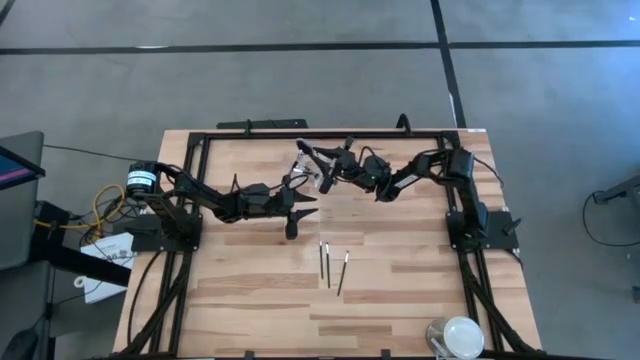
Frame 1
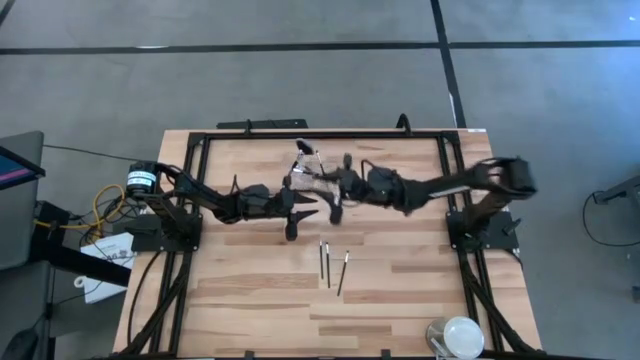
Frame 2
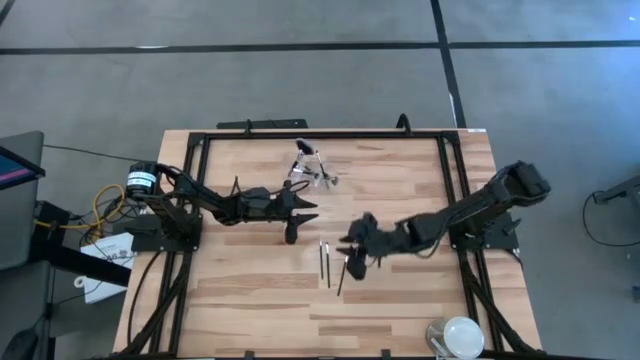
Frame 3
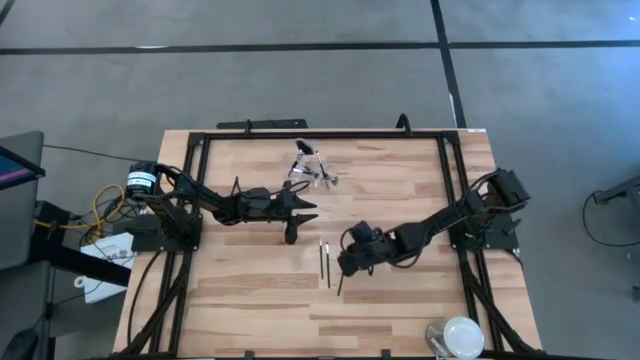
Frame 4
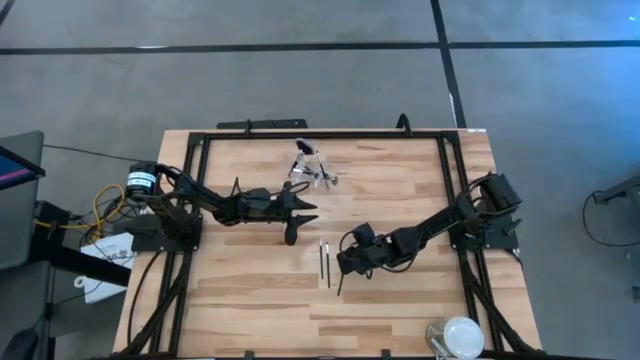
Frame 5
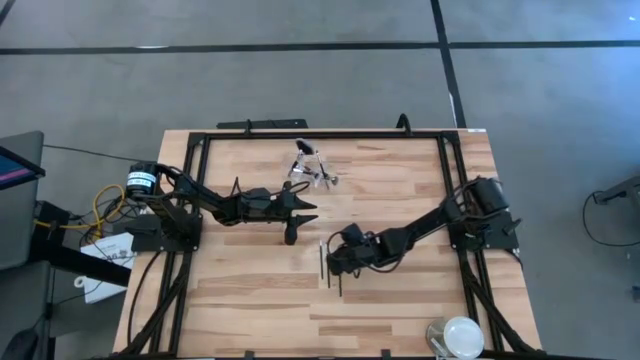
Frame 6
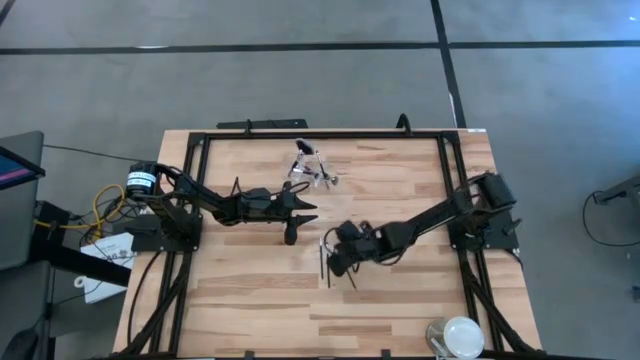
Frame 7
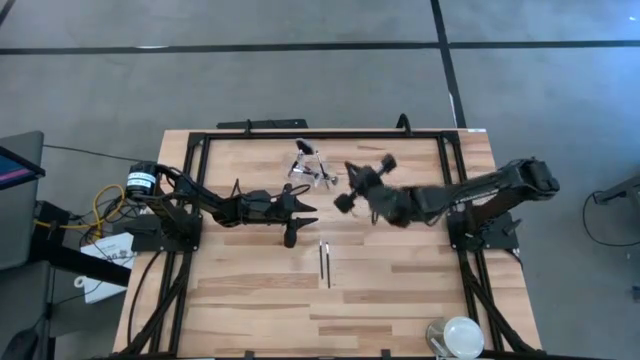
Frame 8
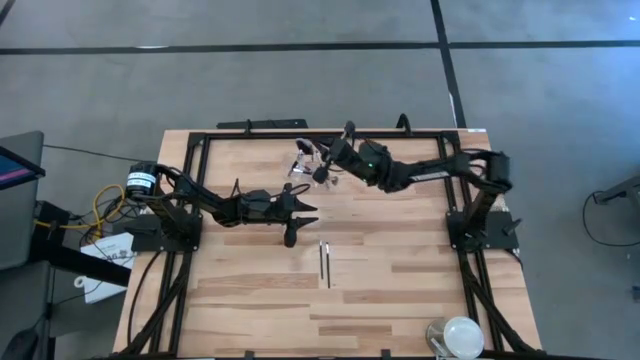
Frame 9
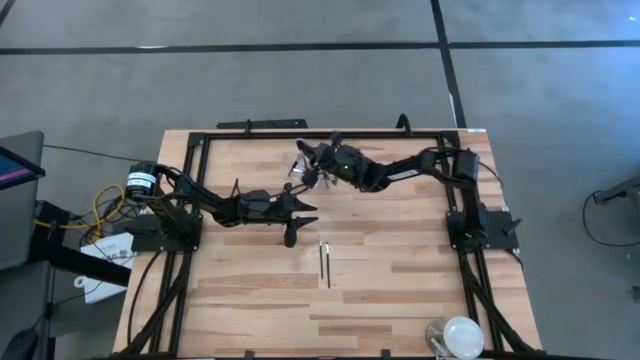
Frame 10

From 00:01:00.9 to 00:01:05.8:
Task: Sort items
Put the right eyeshadow brush into the transparent organizer

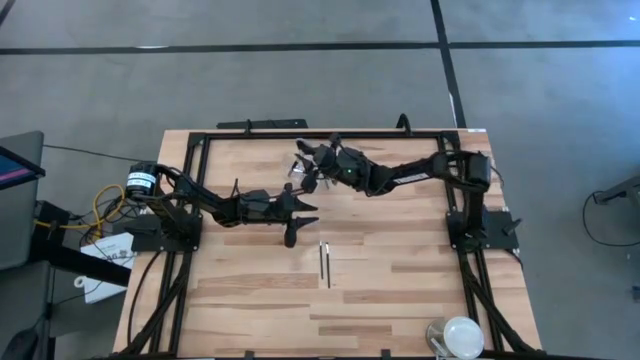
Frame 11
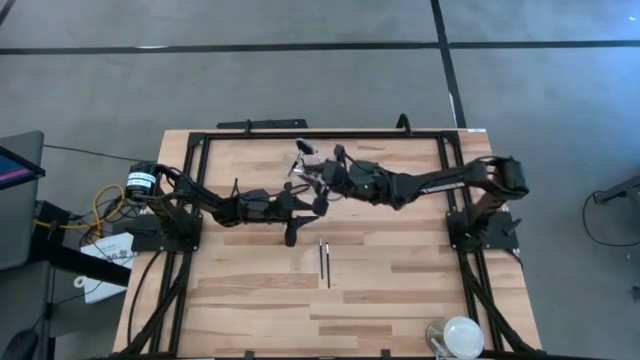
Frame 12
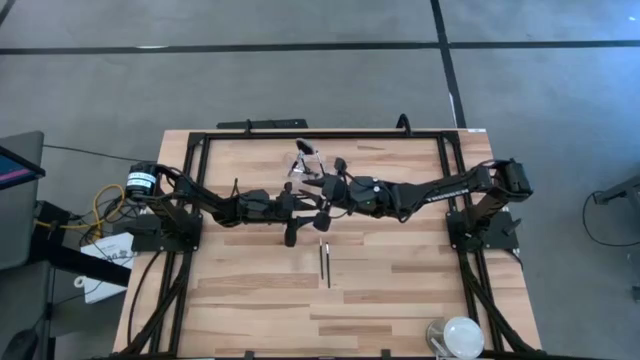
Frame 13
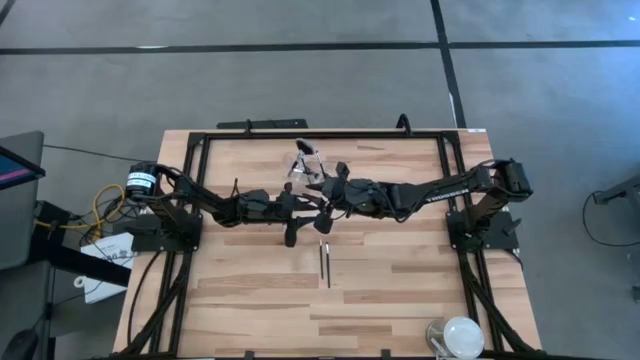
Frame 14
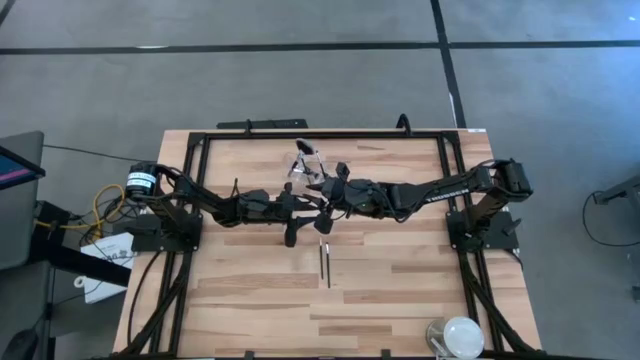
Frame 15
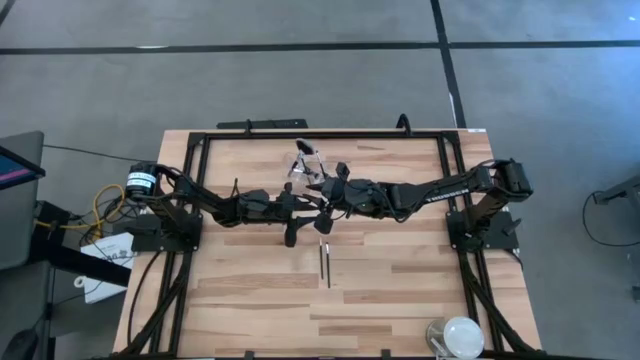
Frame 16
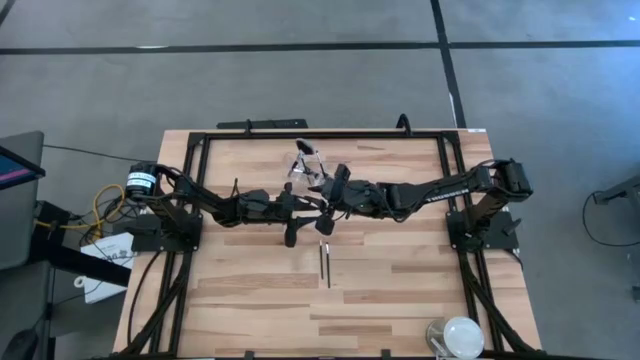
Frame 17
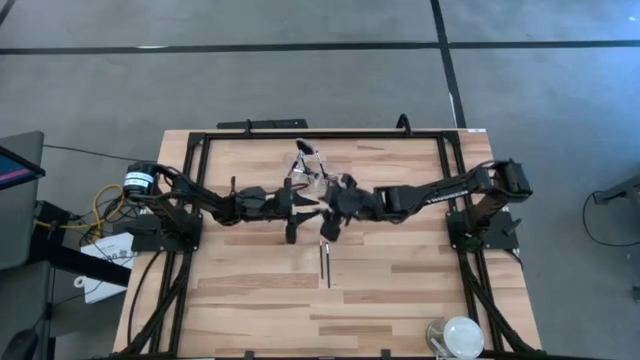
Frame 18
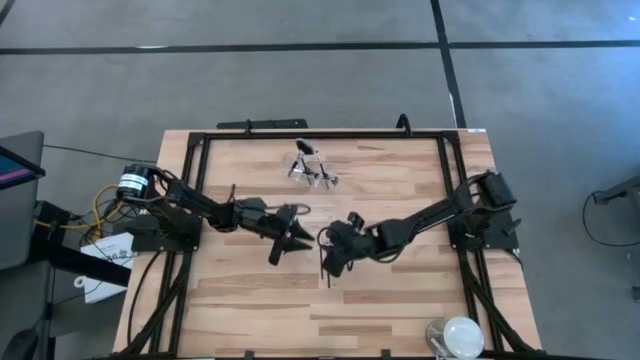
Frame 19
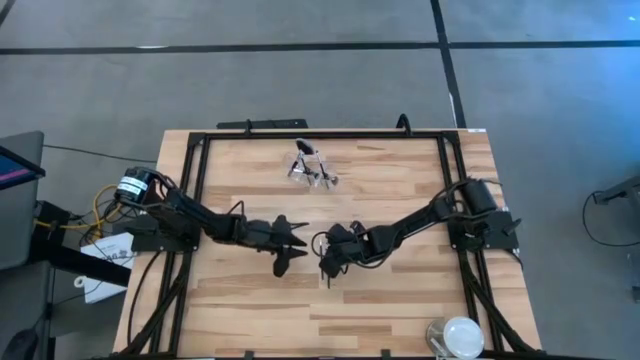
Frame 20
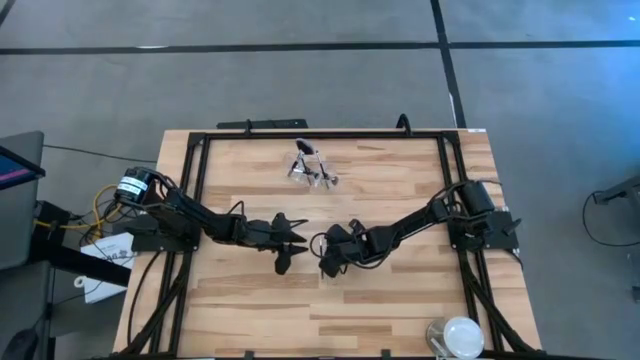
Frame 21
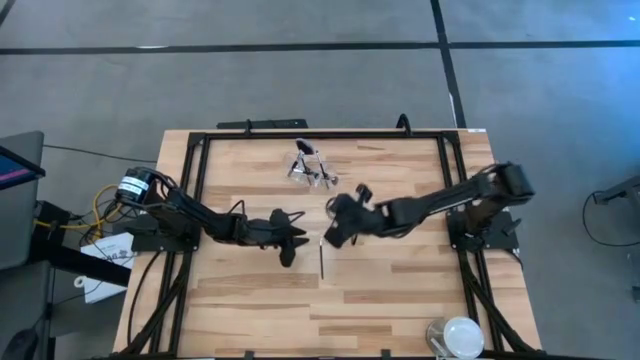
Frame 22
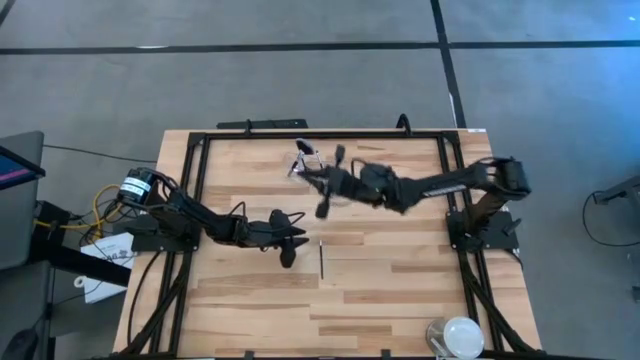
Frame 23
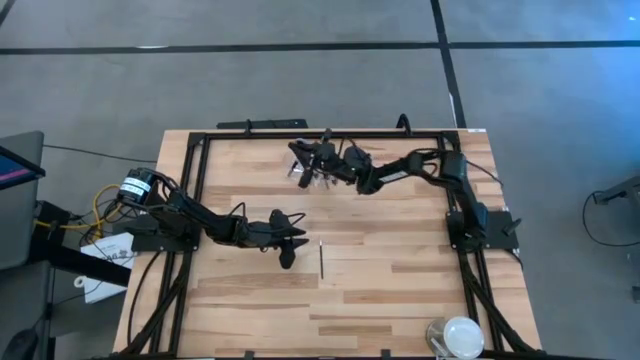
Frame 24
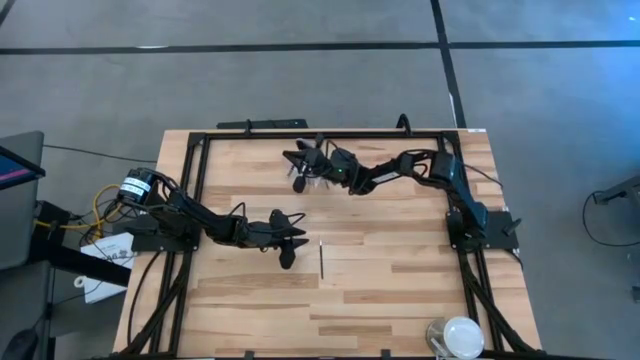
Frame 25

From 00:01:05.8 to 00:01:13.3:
Put the eyeshadow brush into the transparent organizer

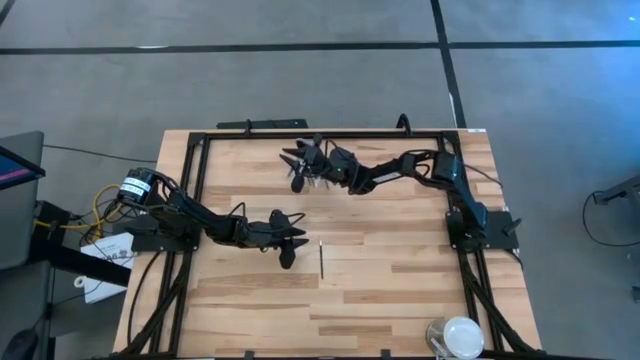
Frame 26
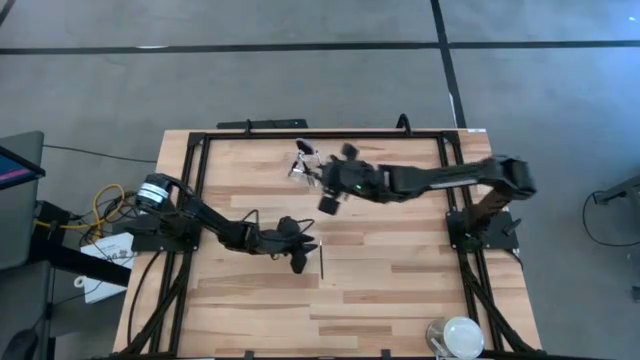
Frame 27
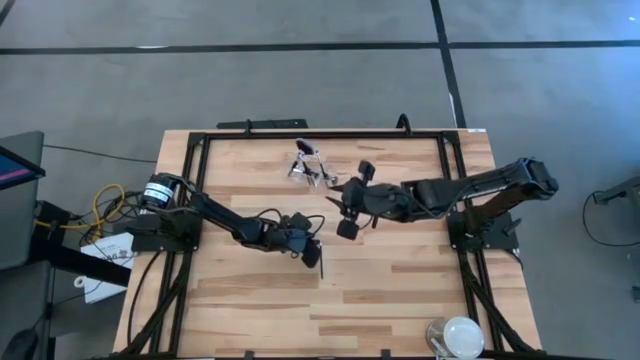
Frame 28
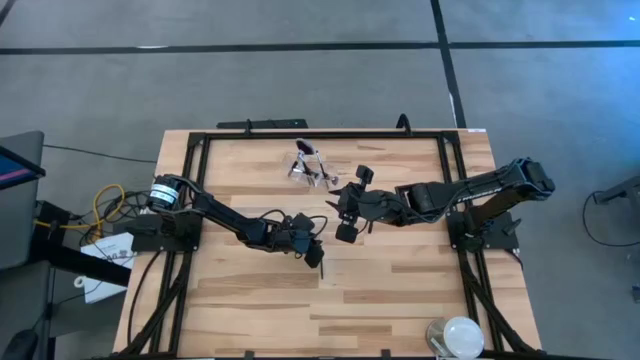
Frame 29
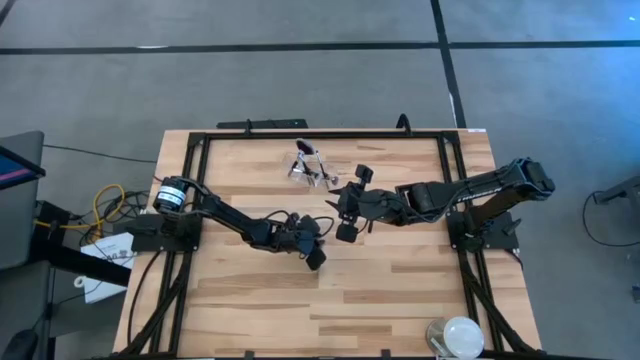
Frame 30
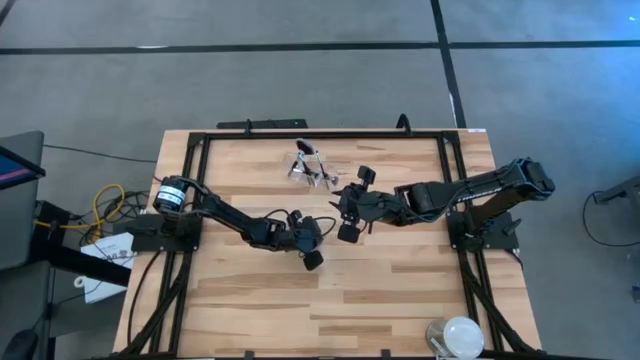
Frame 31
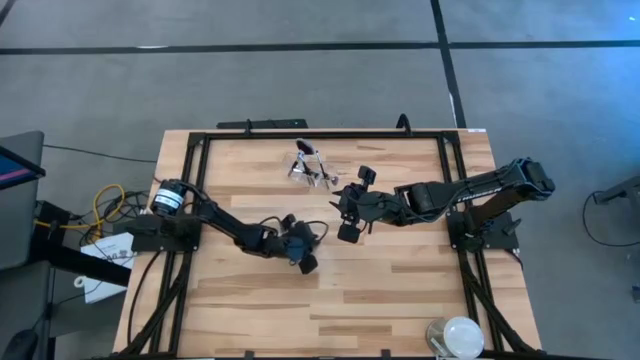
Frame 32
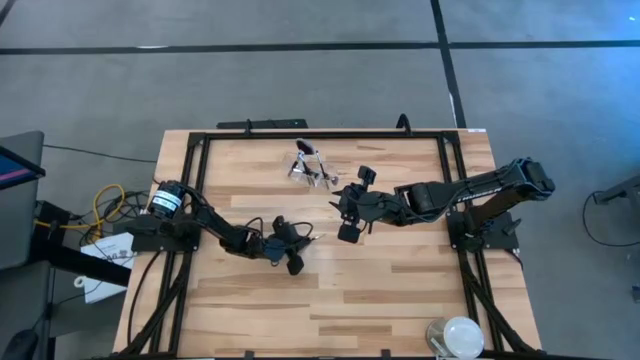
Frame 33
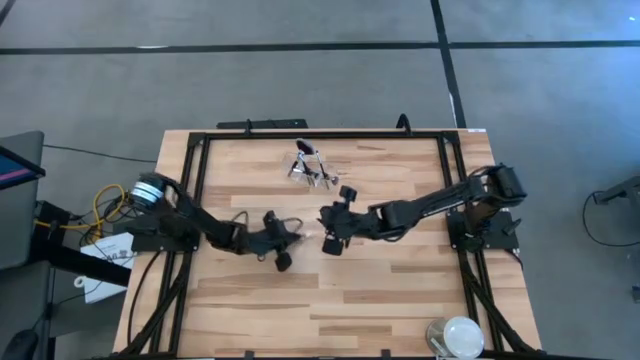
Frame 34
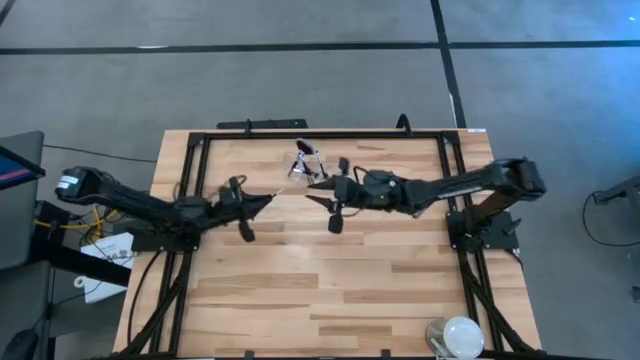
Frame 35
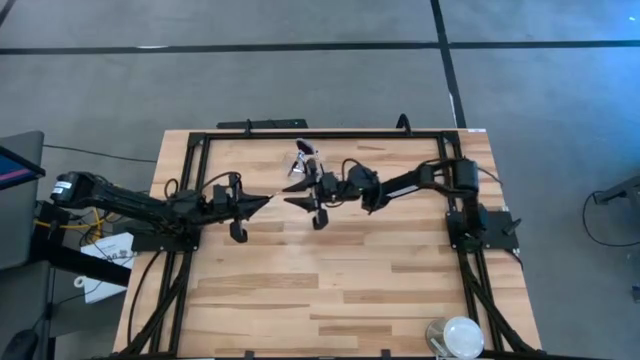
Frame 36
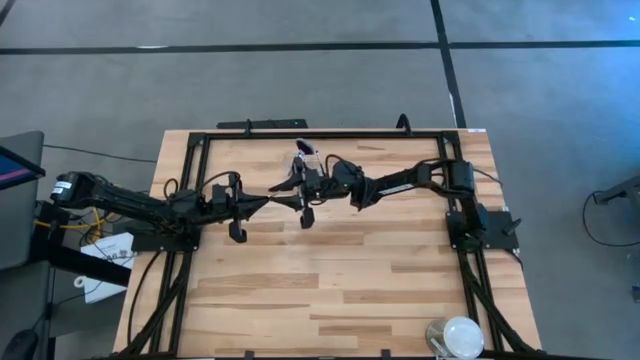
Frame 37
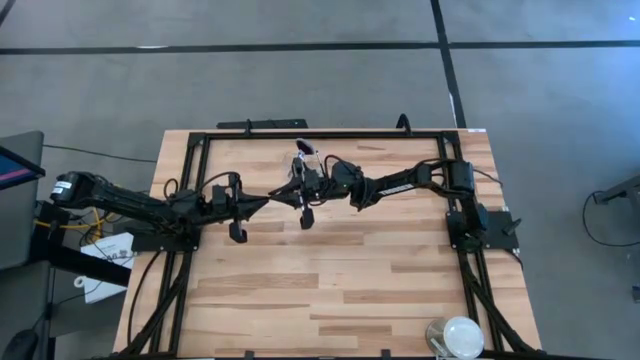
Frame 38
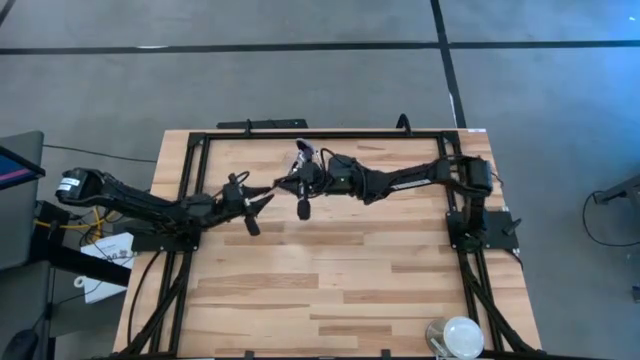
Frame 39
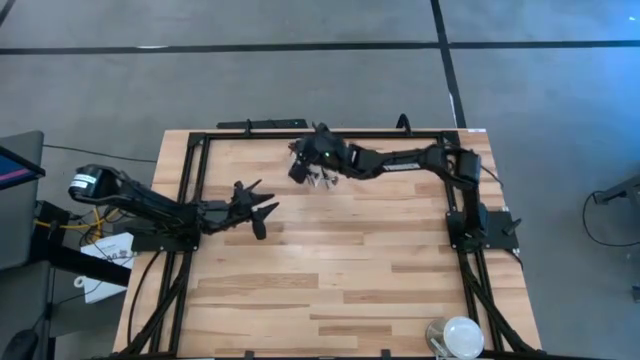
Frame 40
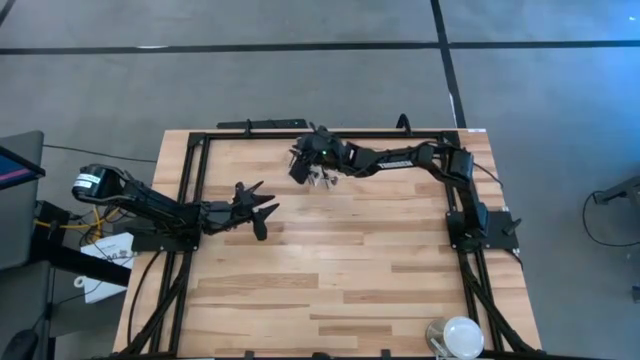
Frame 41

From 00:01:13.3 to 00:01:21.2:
Put the liner brush into the transparent organizer

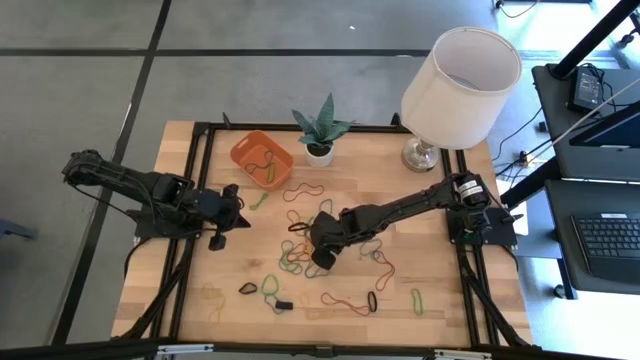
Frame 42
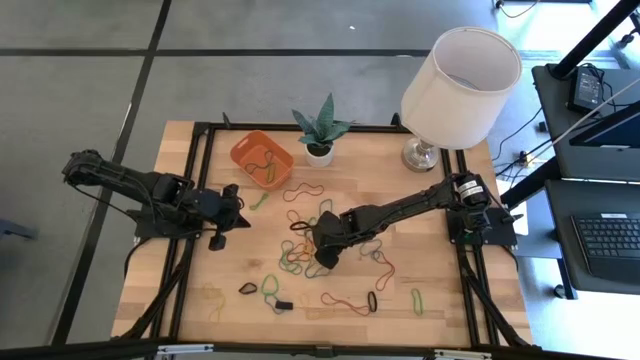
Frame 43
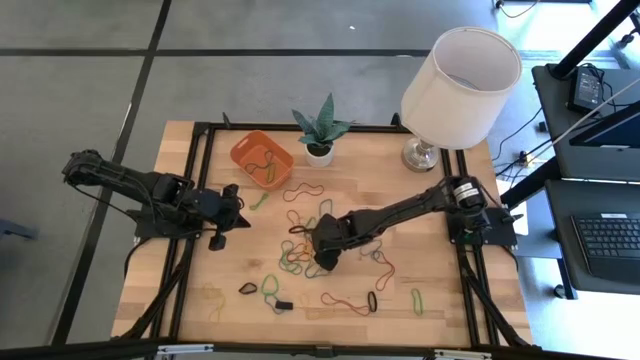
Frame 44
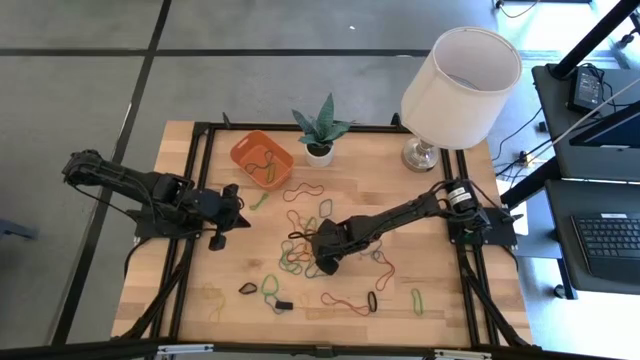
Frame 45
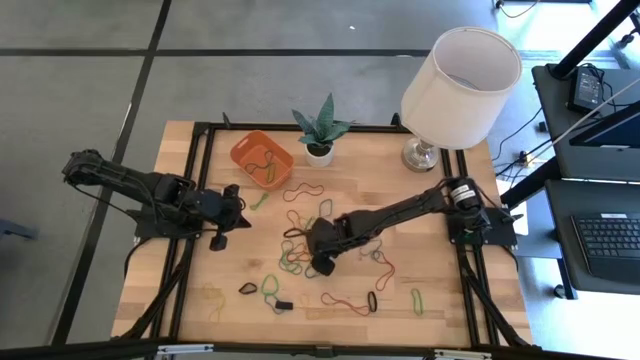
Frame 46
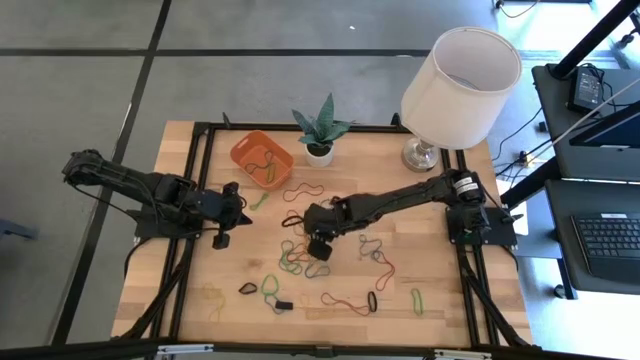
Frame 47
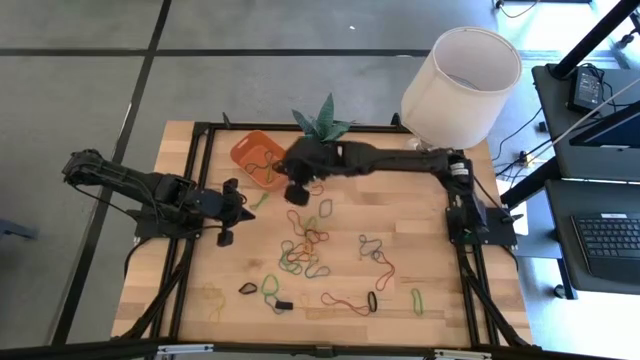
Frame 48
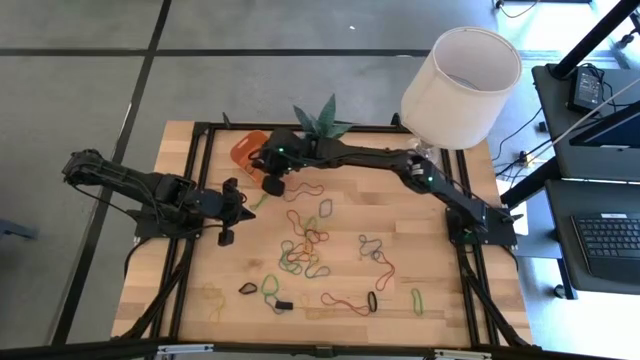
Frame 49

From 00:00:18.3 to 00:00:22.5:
Task: Pick and place rubber bands into bin
Put the black rubber band into the orange bin
